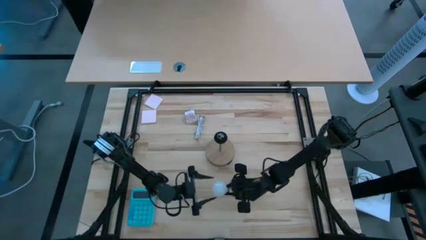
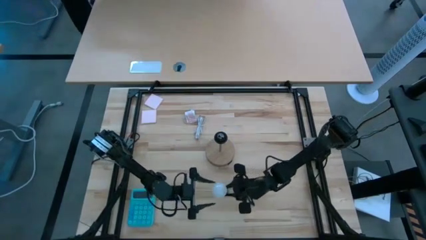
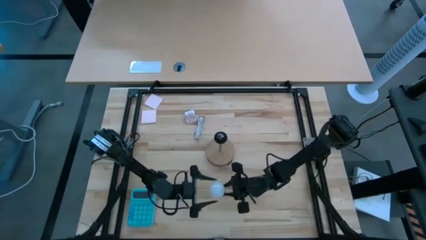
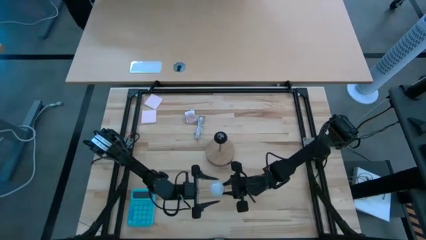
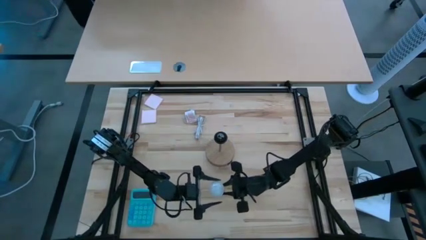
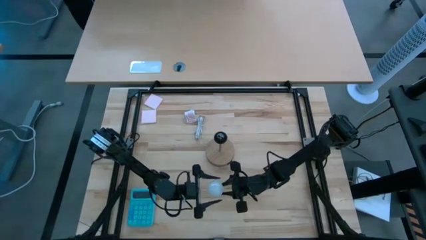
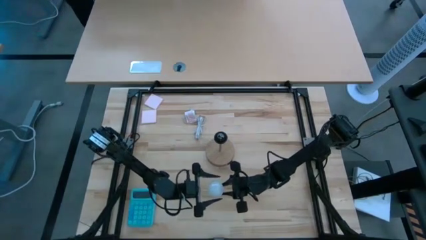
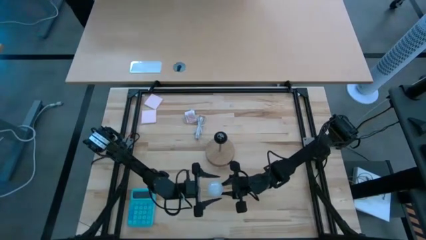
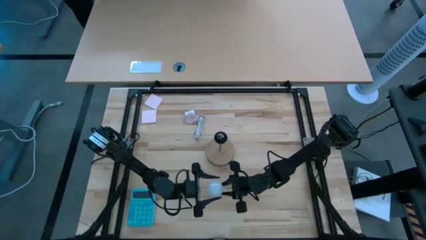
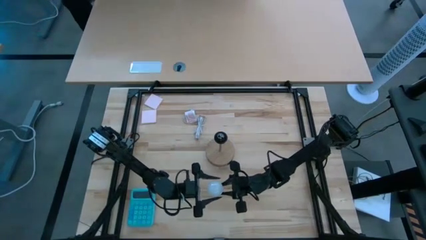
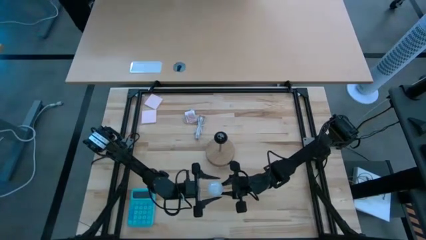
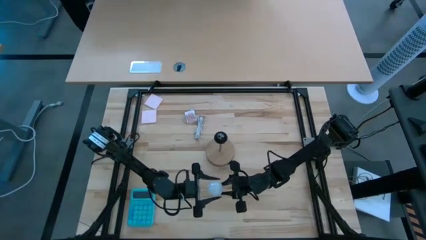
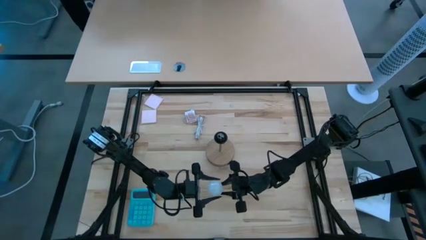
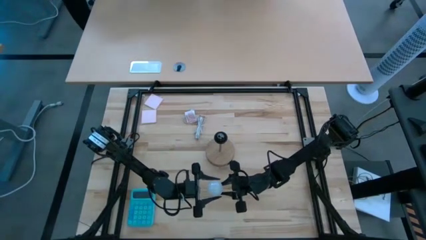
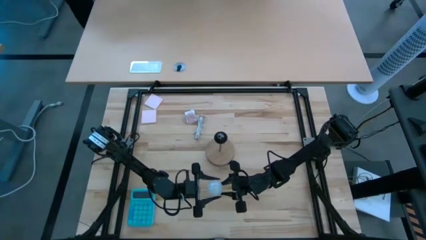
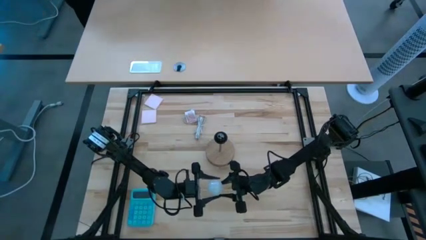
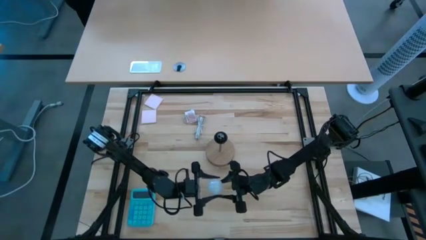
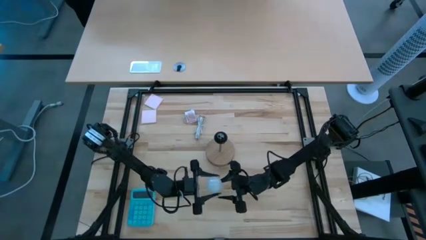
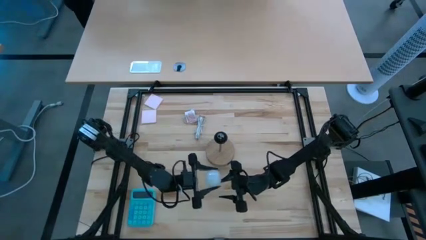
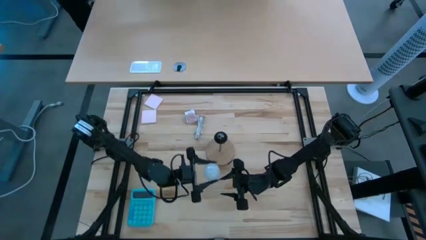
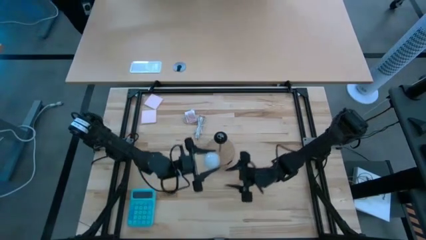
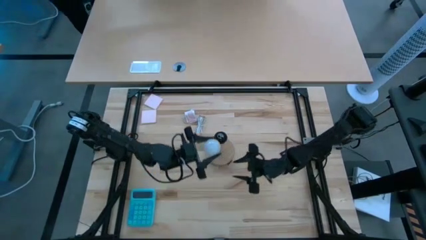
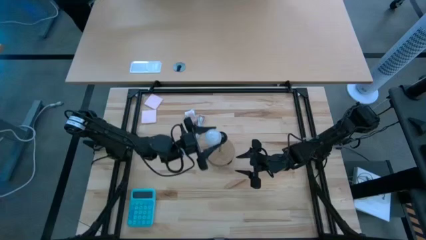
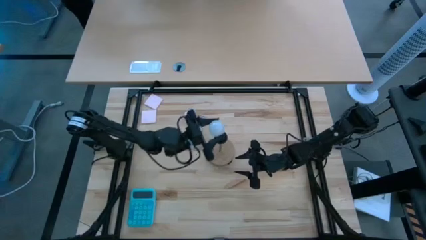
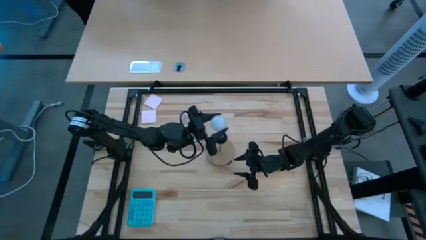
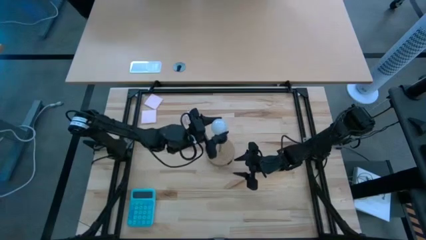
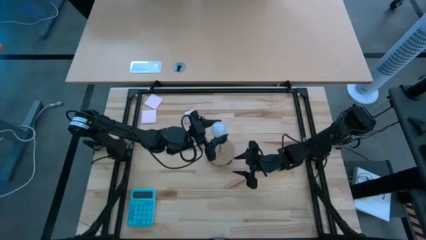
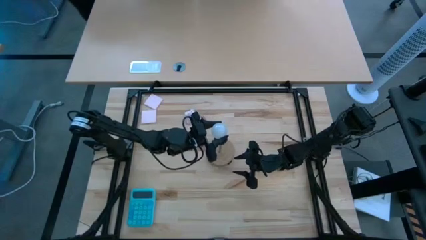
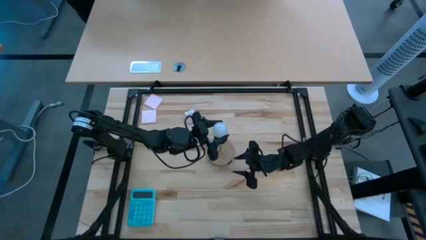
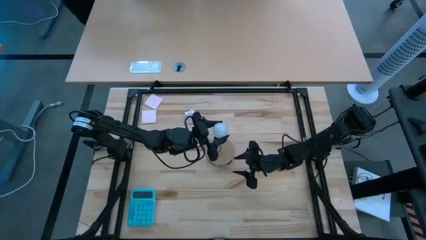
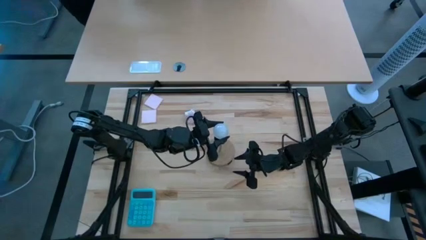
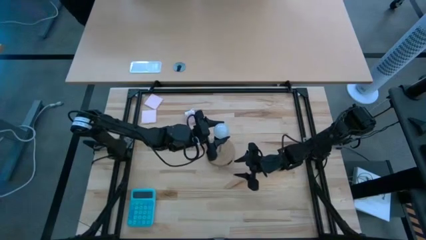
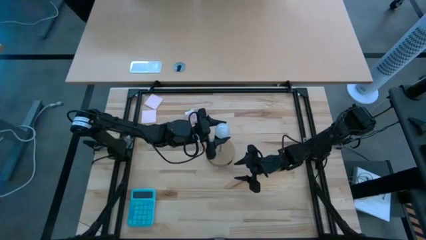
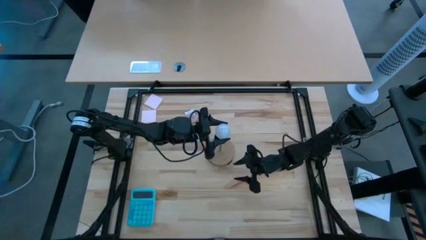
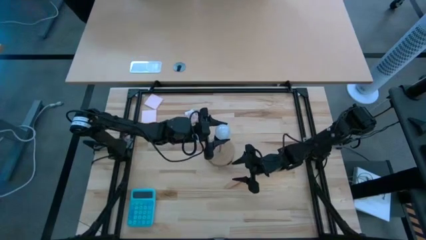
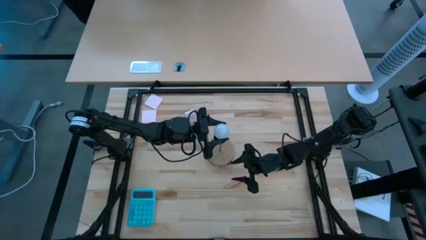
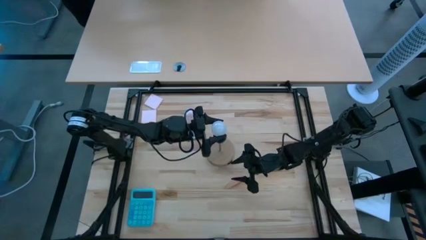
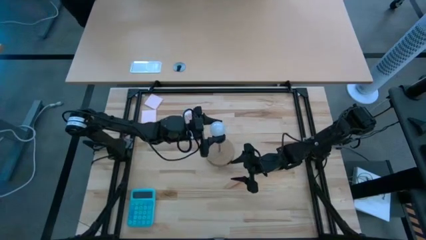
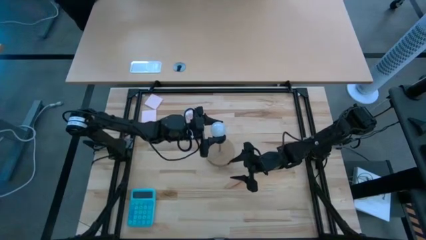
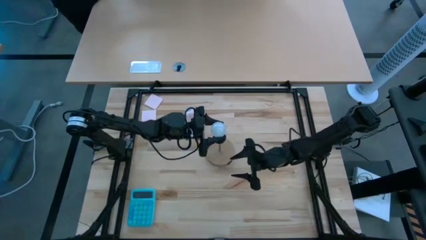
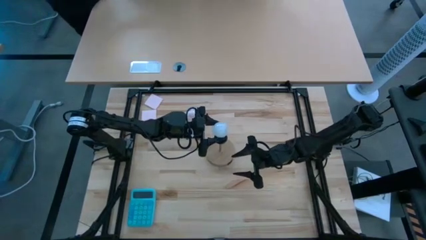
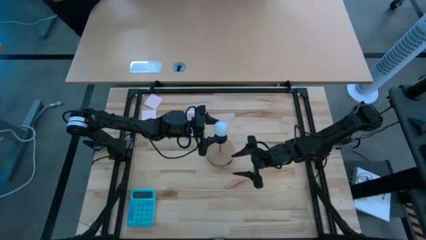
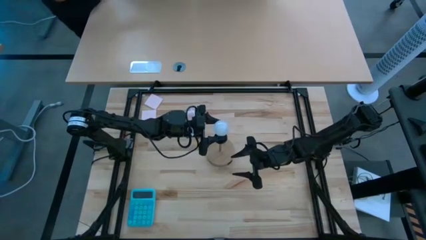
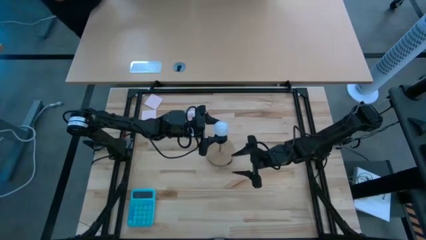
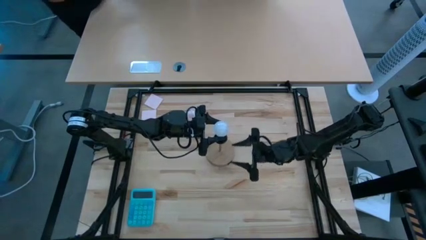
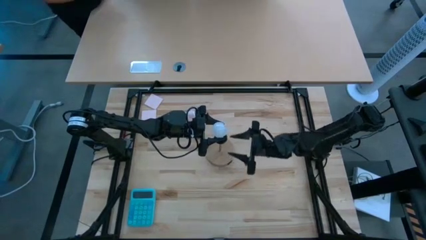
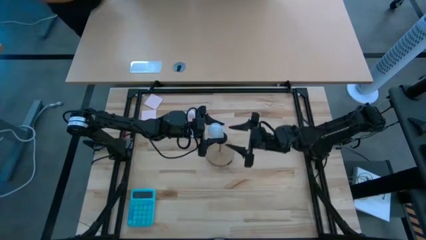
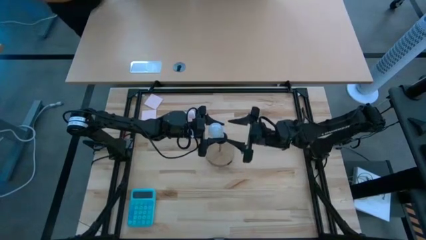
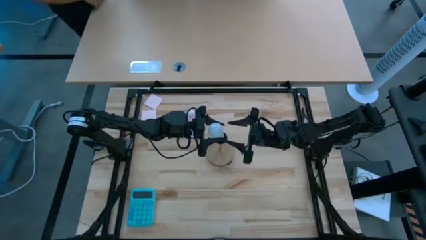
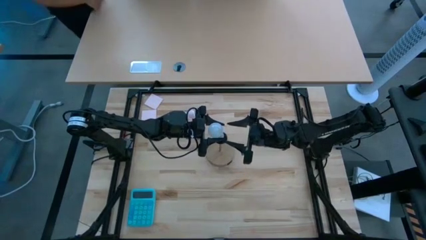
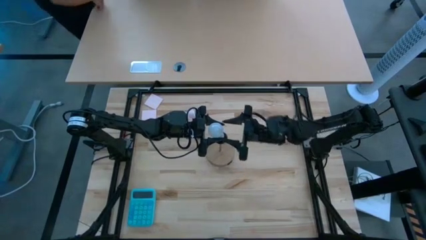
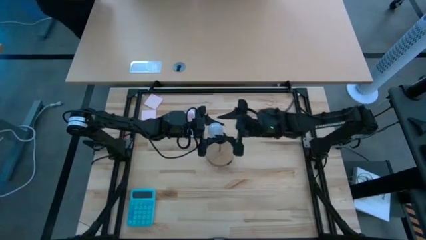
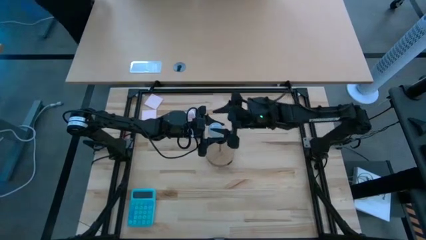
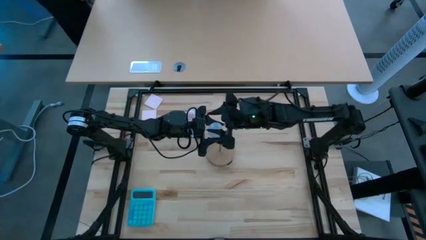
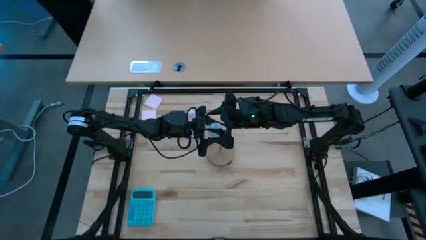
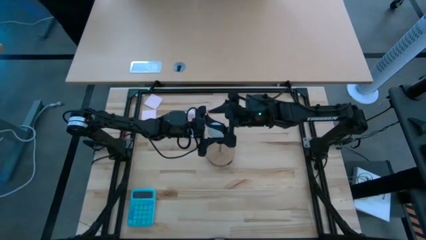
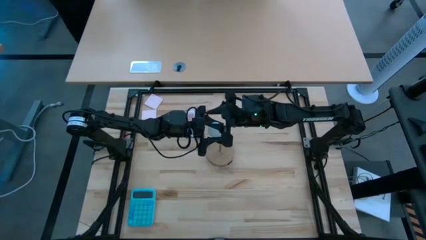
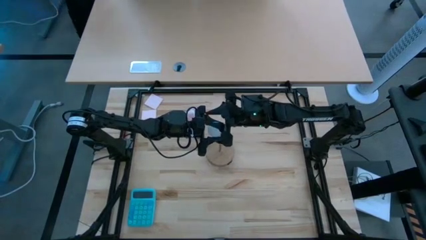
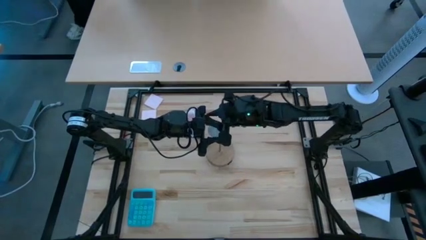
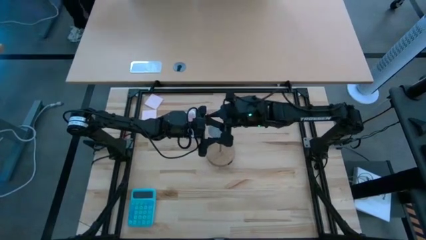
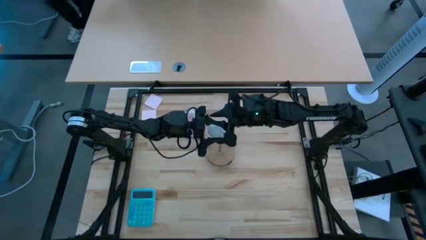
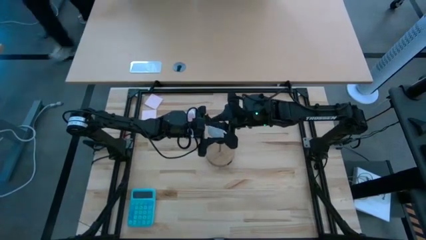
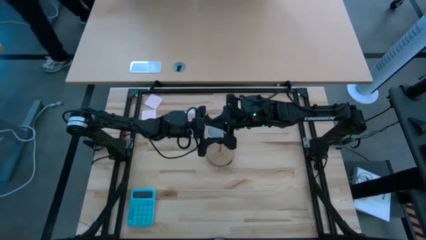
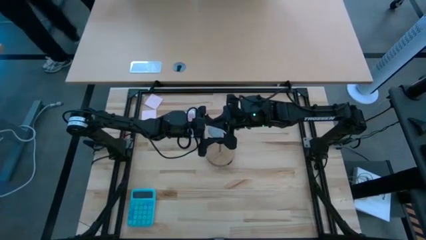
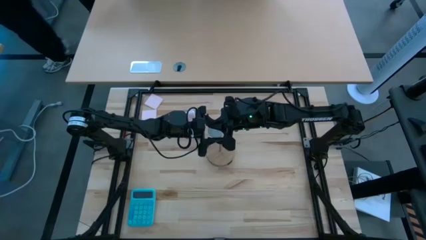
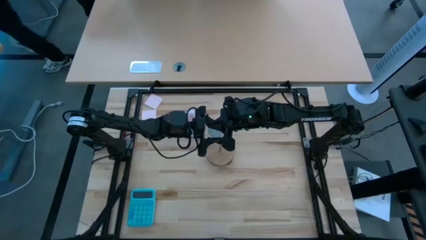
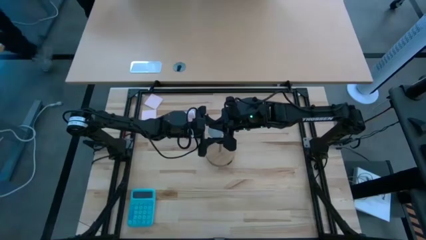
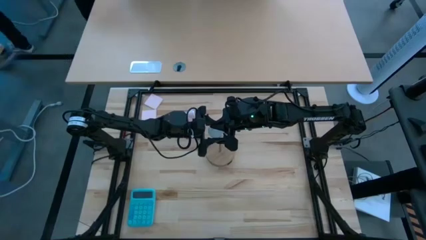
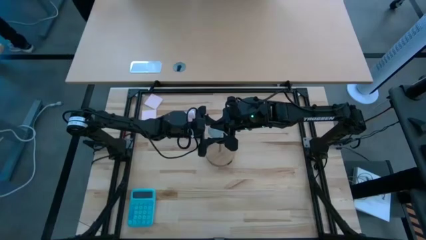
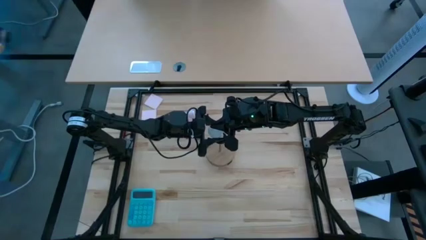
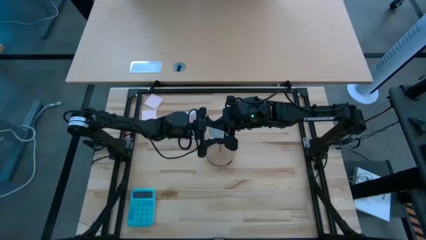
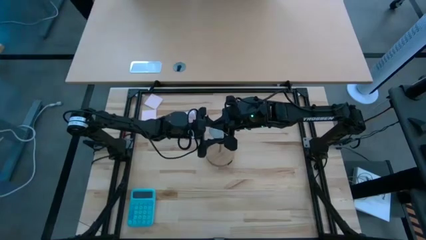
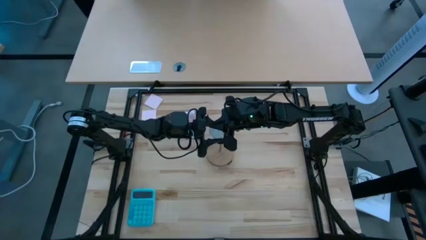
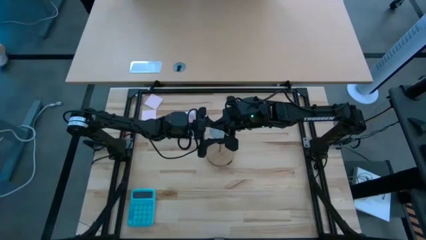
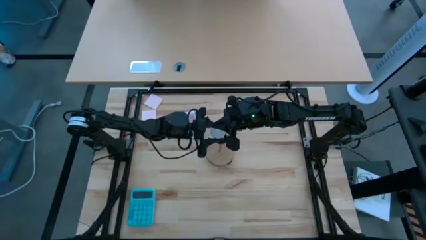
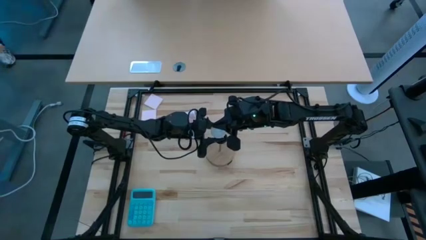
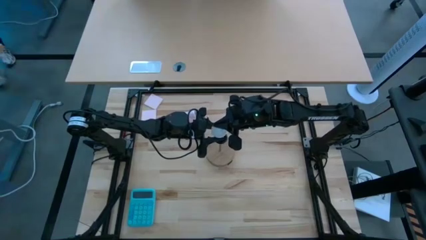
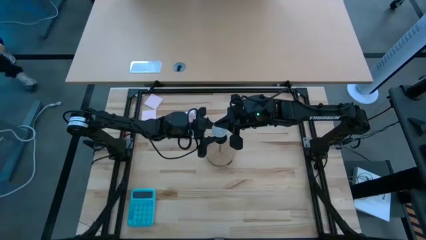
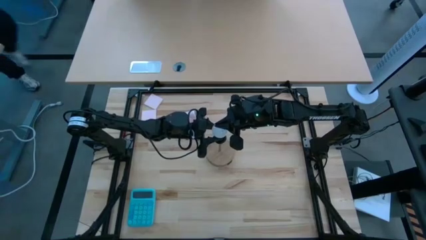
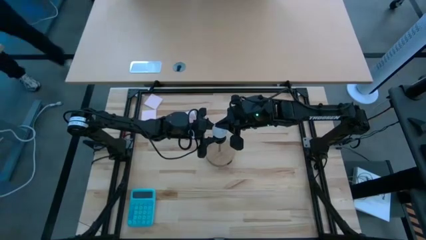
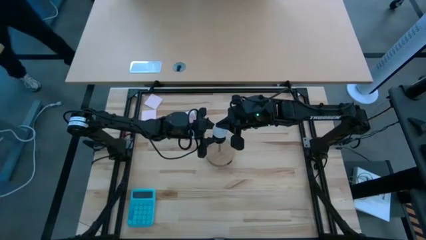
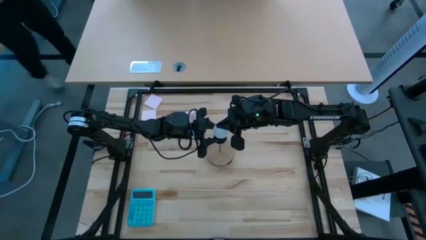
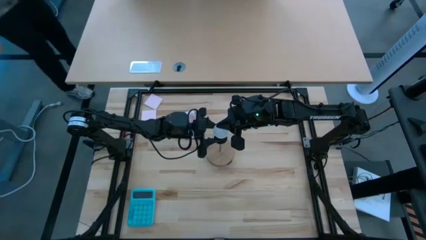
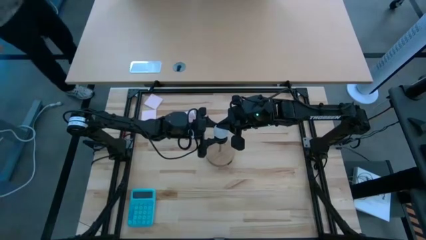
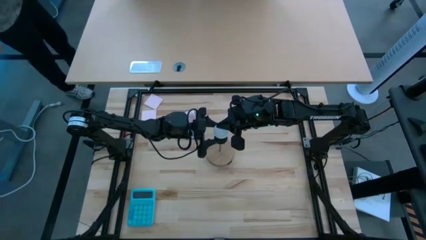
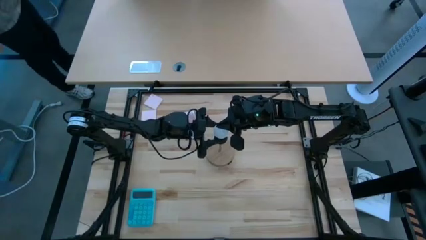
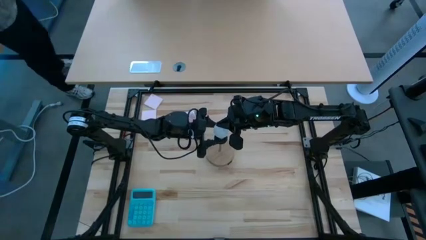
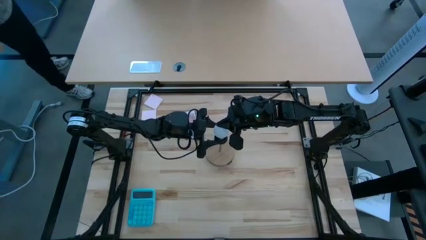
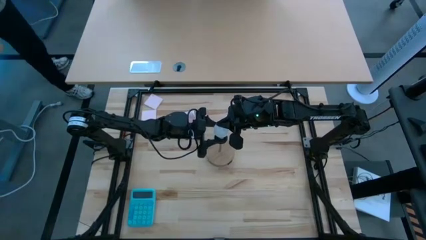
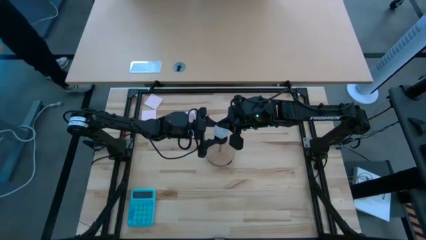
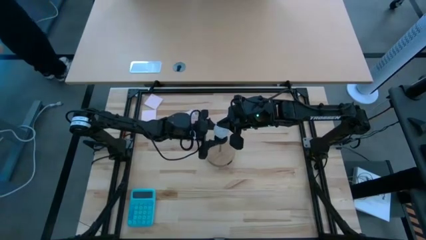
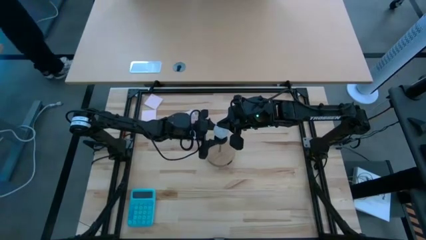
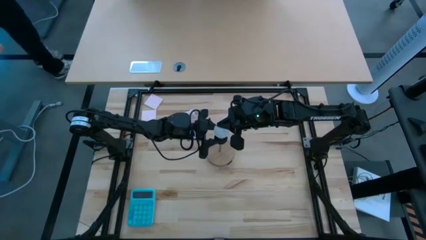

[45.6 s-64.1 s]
Task: Screw lightbulb
Insert the lightbulb into the lamp
